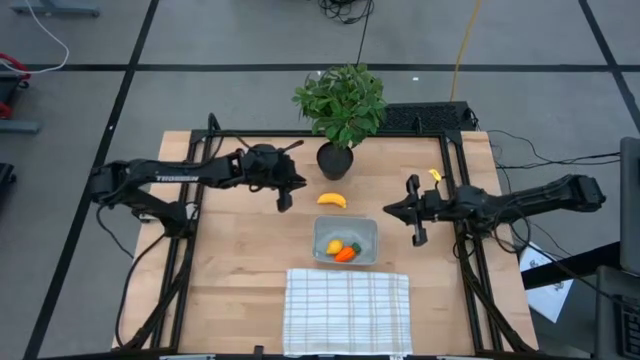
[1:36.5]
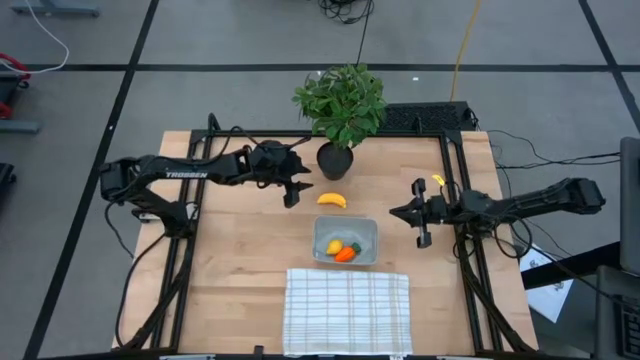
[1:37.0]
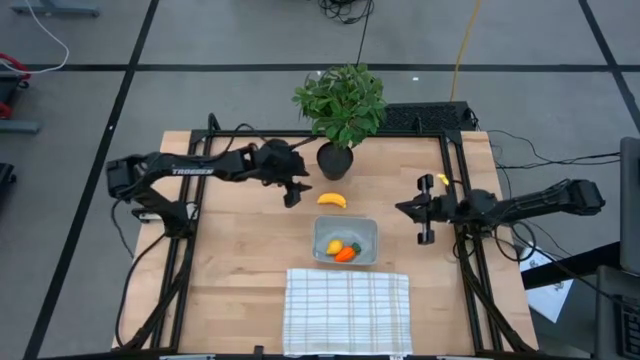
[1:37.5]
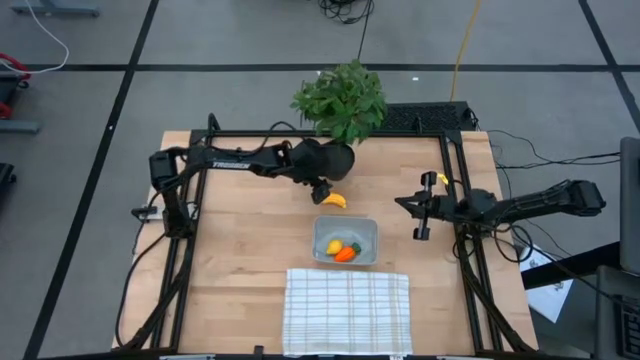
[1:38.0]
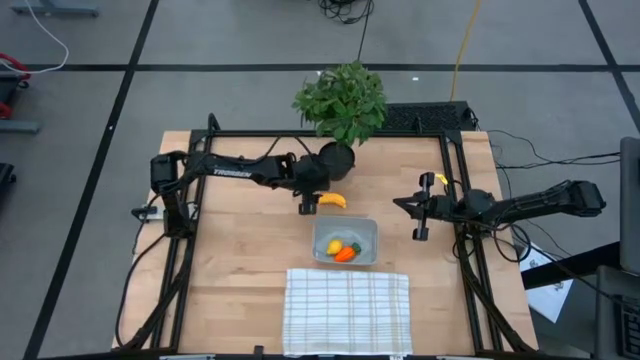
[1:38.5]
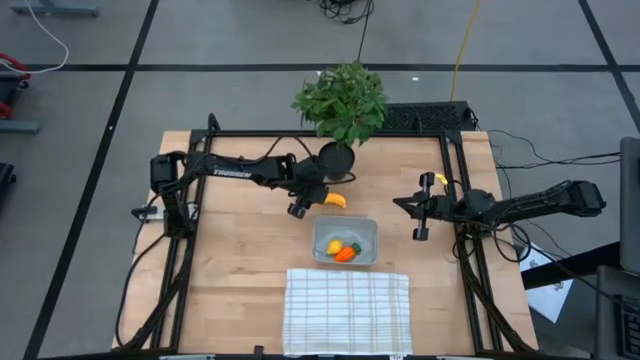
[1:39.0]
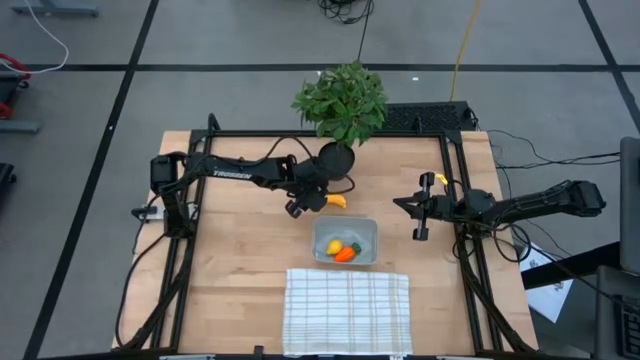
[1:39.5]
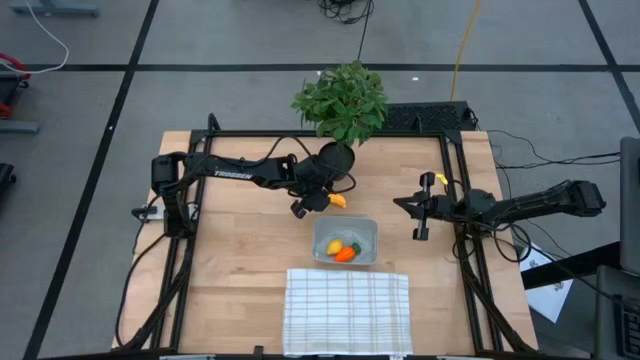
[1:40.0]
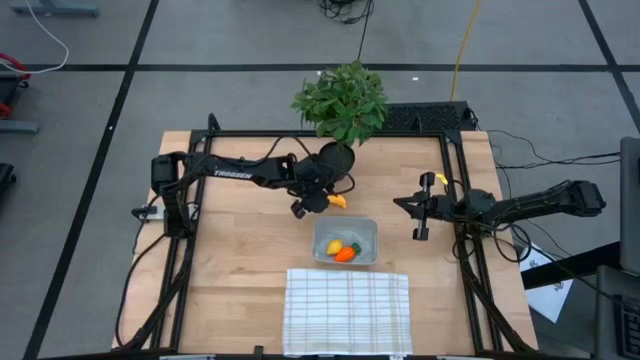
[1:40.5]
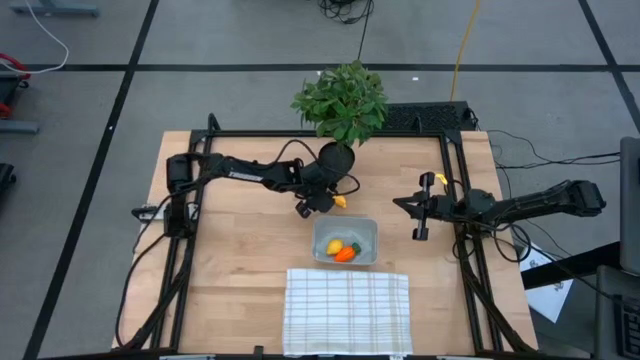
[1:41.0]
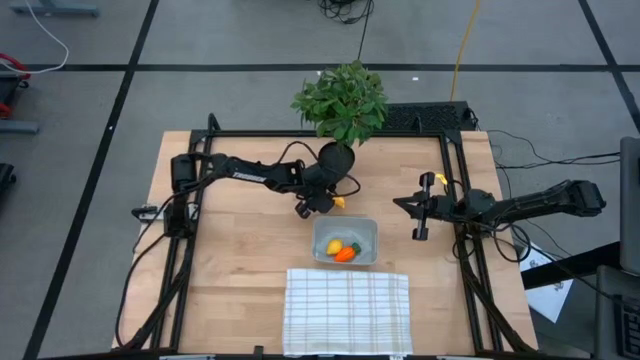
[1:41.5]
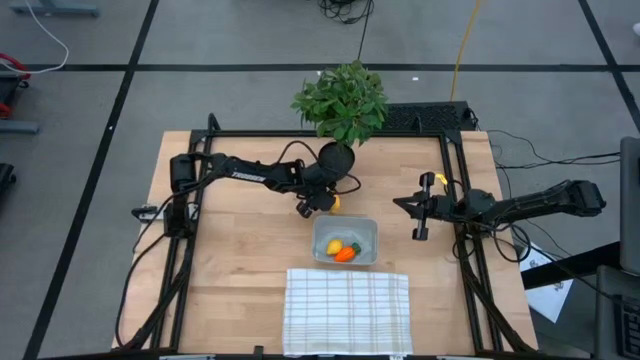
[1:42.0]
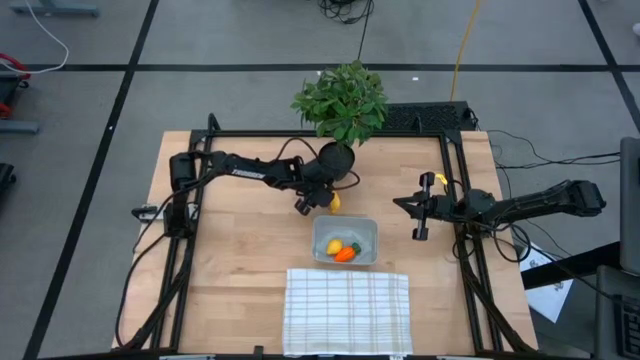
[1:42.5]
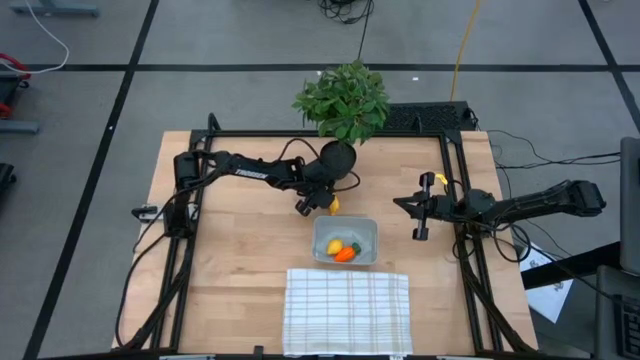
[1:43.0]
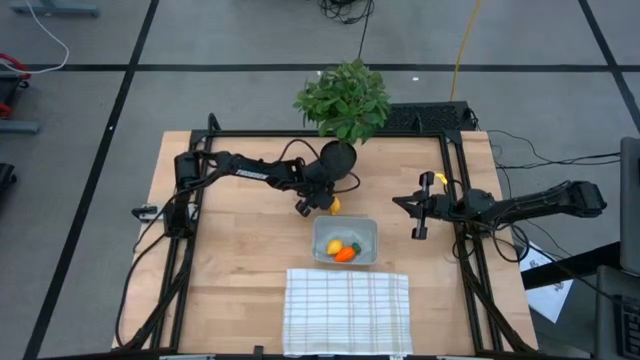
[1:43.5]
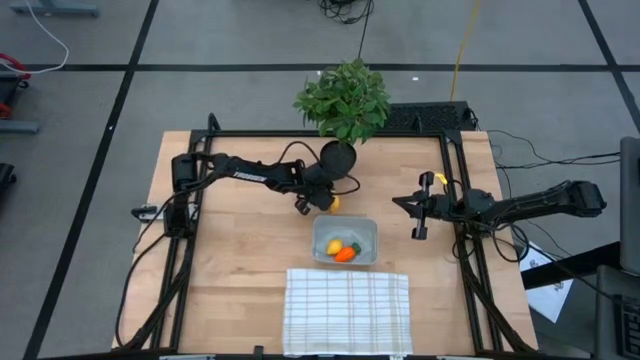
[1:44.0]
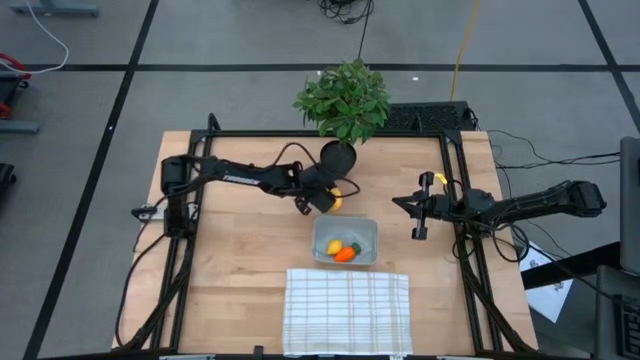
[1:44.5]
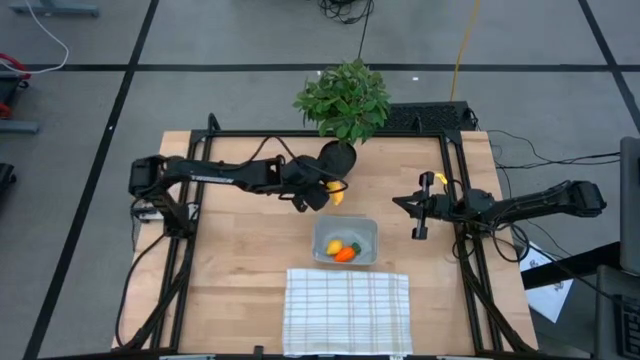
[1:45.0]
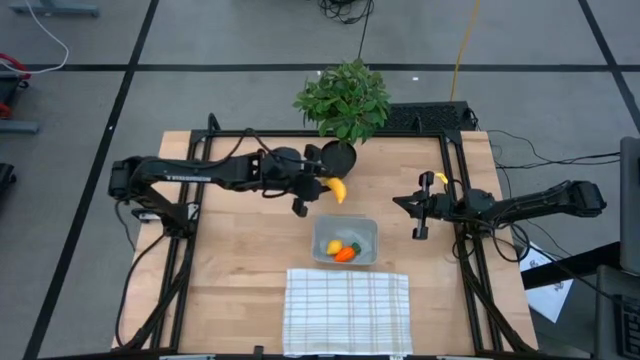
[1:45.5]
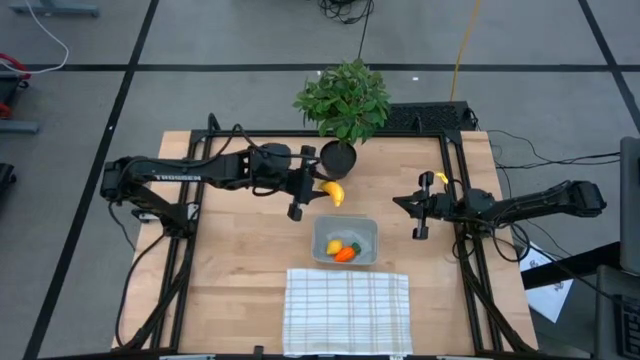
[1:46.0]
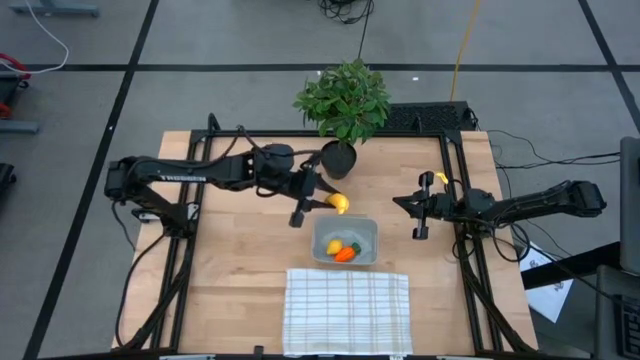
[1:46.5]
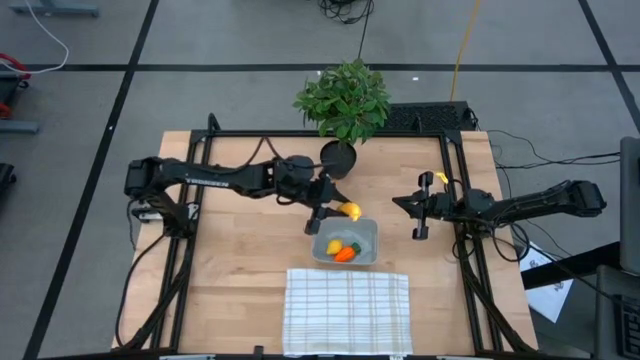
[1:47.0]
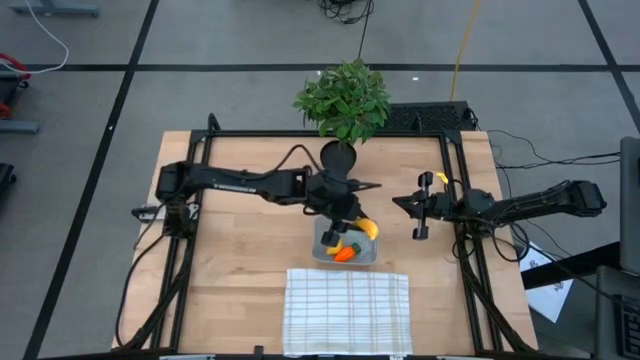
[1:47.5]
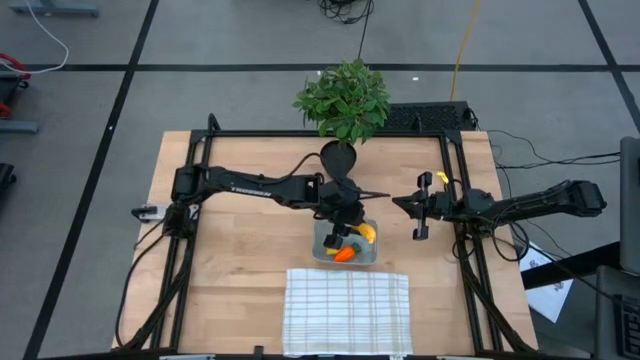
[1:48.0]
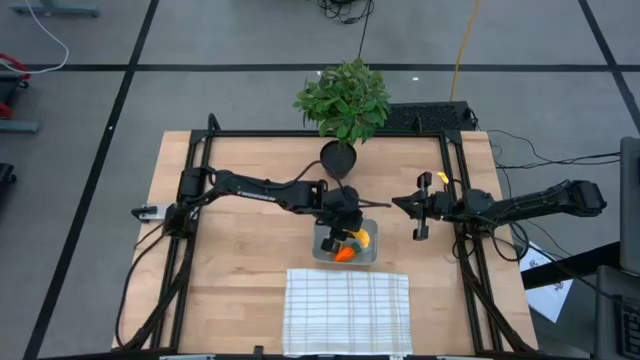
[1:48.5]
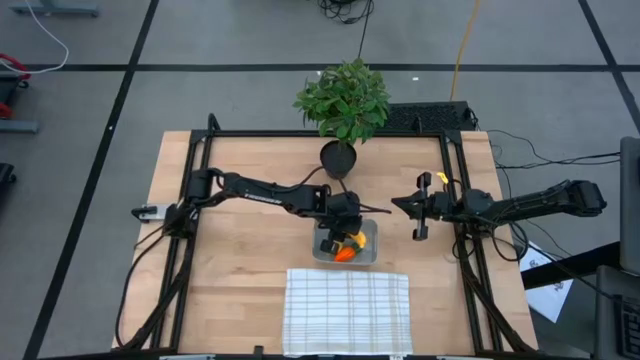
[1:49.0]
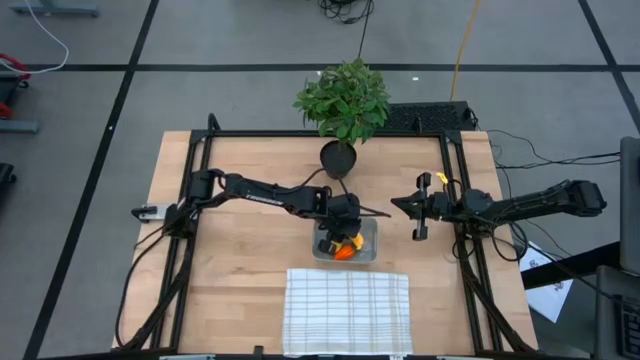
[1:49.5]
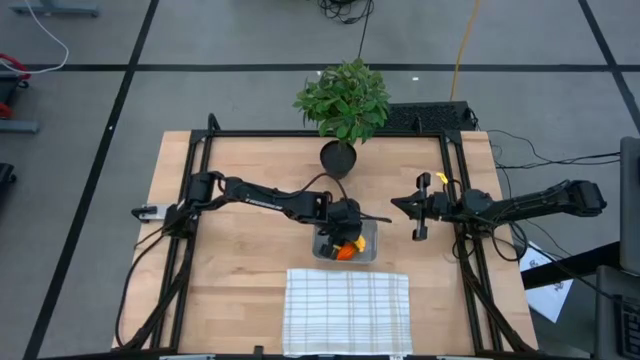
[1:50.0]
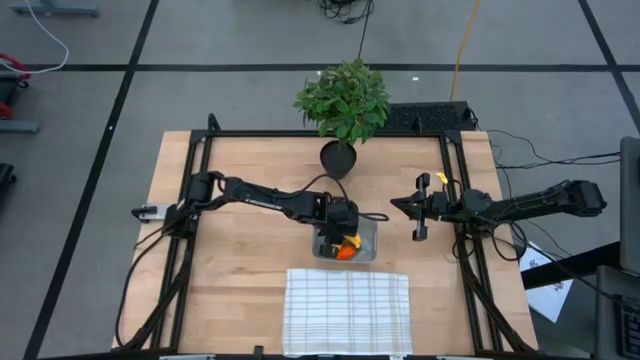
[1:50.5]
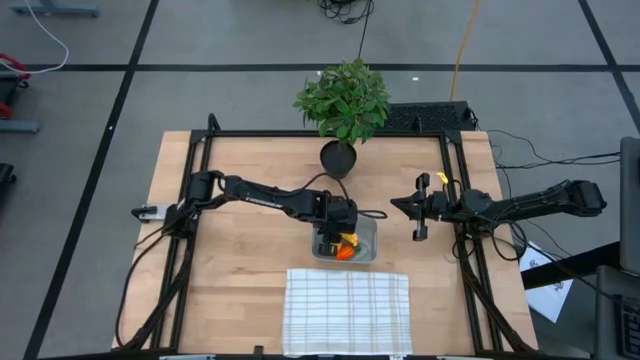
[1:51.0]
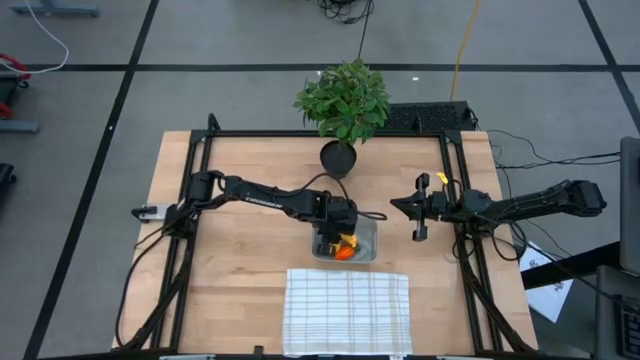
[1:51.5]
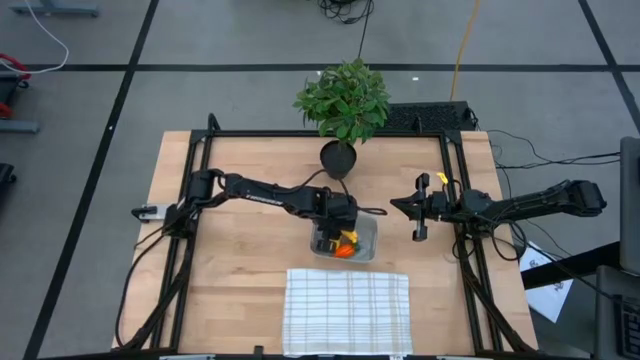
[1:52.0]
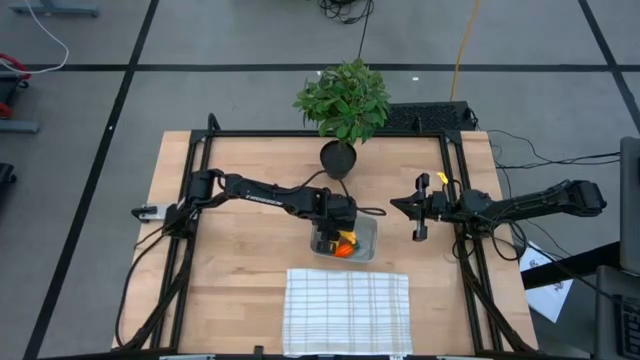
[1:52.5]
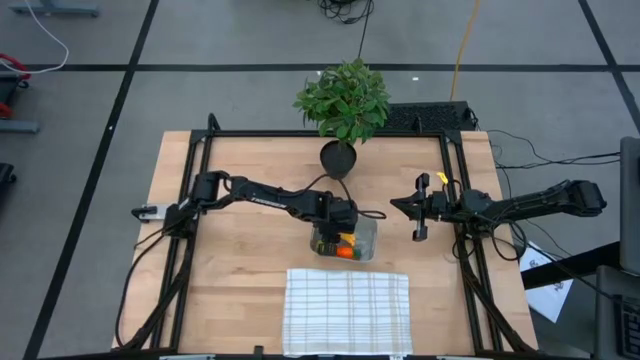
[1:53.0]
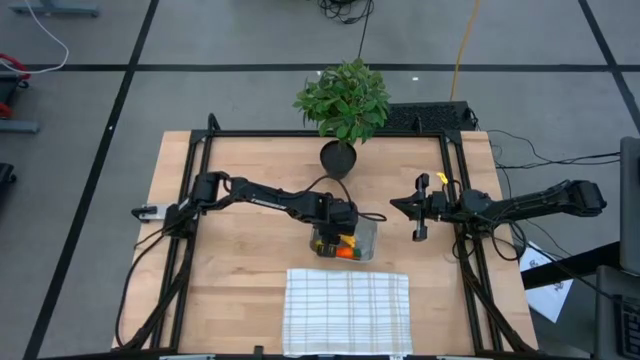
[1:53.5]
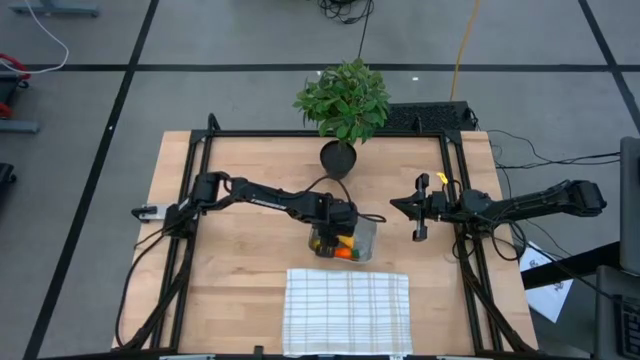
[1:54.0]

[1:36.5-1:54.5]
Task: Pick and placing Produce into tupperware
Put the yellow banana into the gray bin

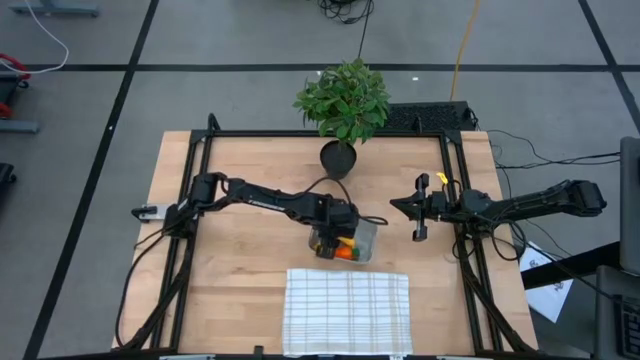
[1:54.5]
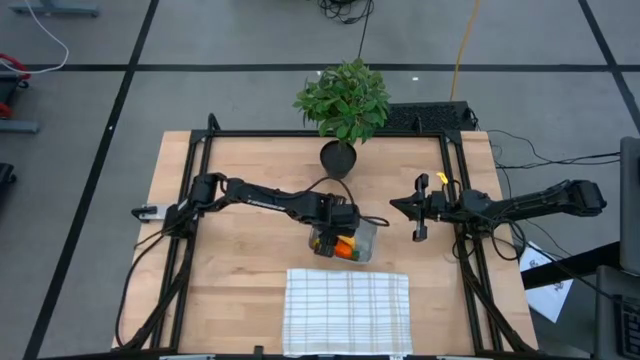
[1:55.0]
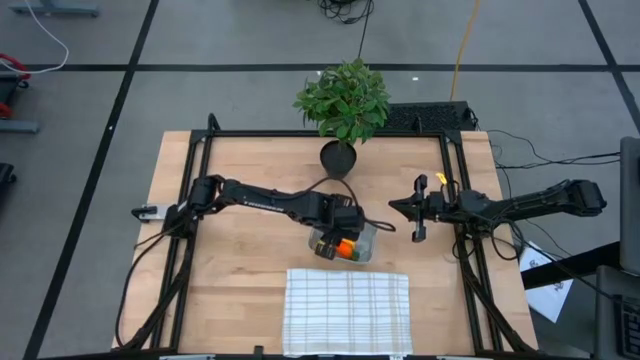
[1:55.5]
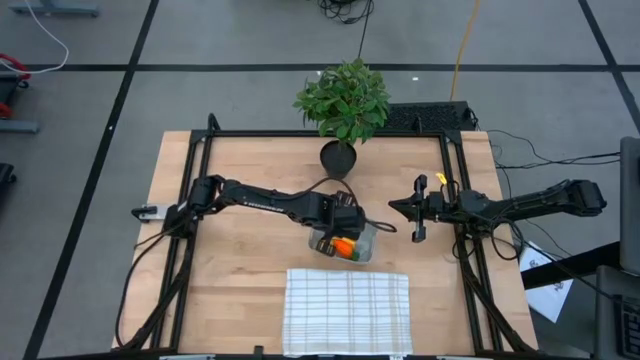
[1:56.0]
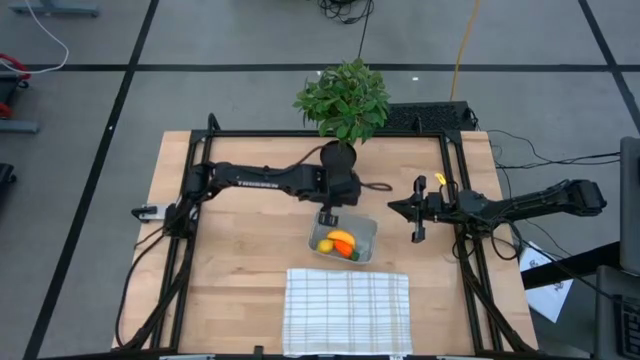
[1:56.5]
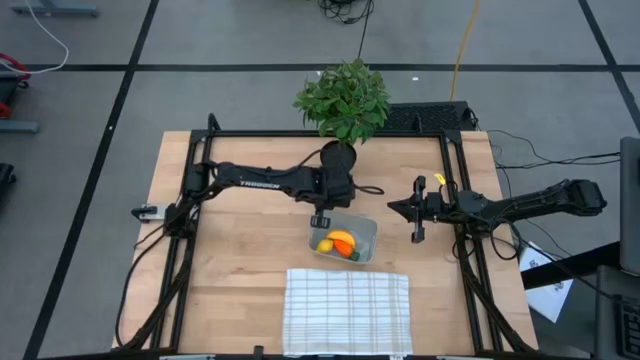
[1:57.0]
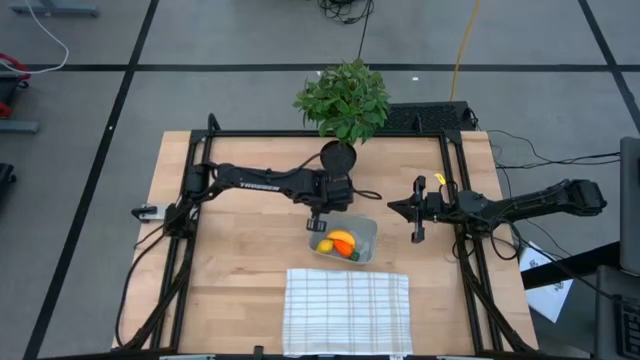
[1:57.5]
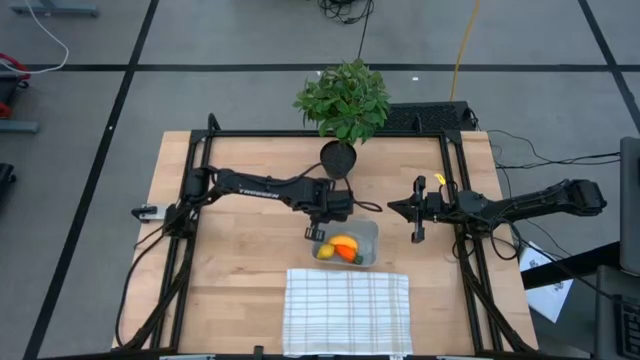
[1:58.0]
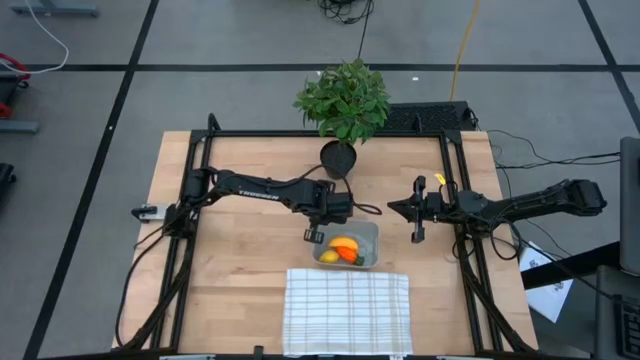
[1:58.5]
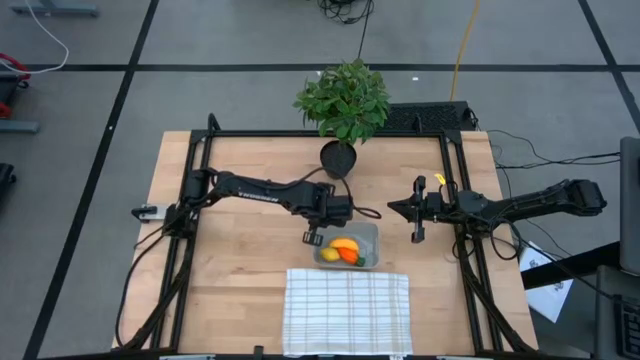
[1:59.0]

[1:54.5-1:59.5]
Adjust the gray bin on the table
